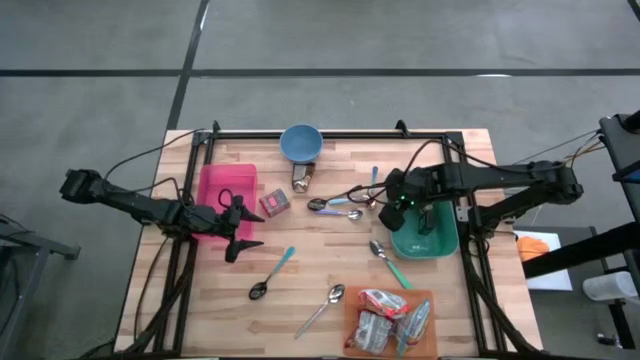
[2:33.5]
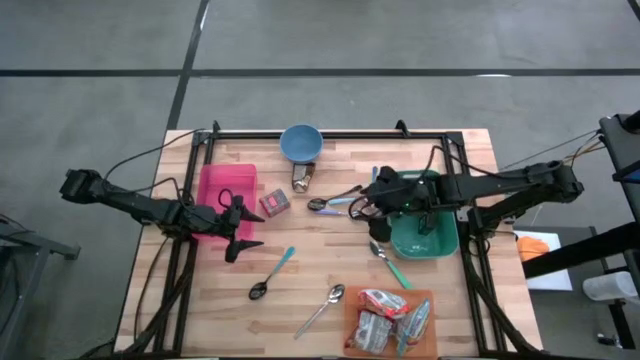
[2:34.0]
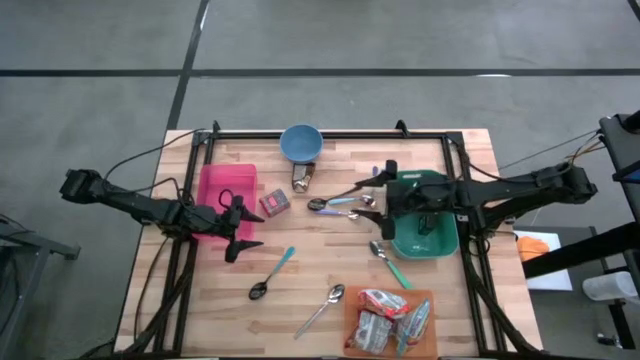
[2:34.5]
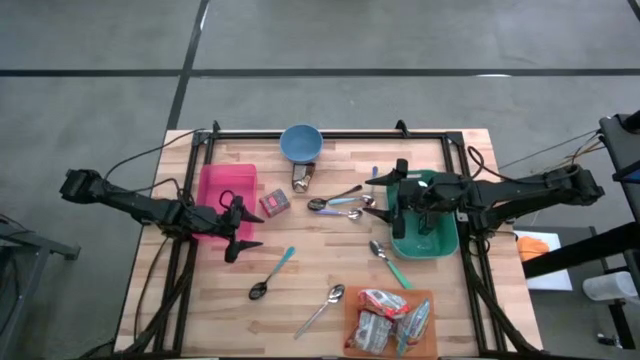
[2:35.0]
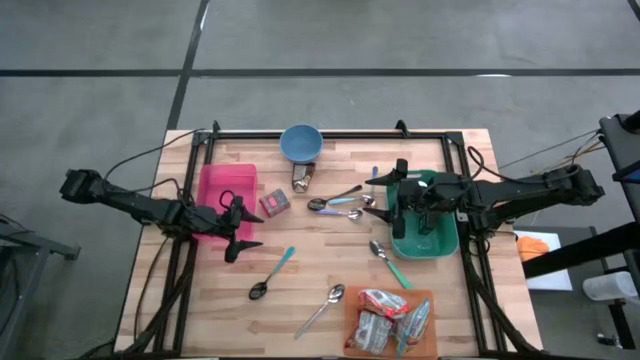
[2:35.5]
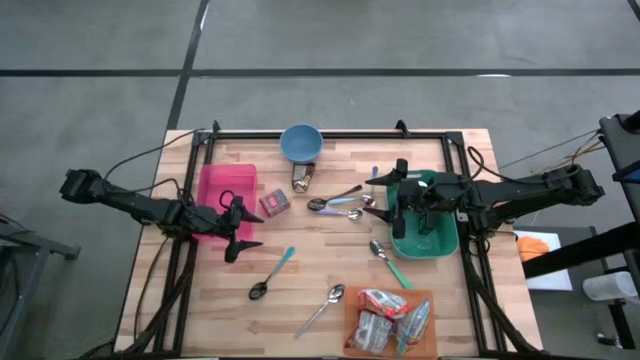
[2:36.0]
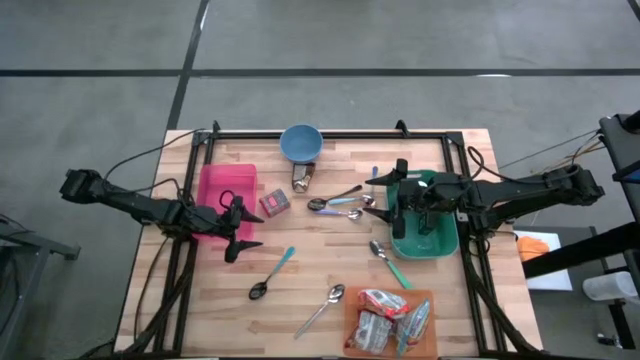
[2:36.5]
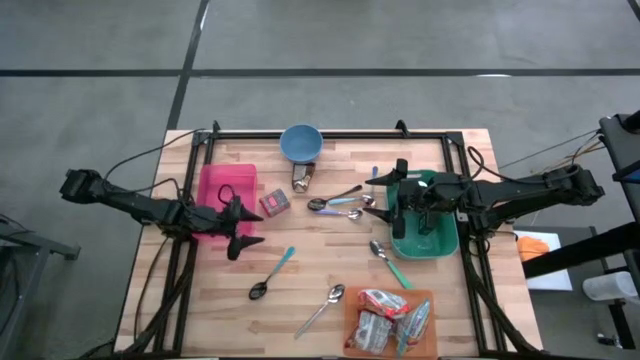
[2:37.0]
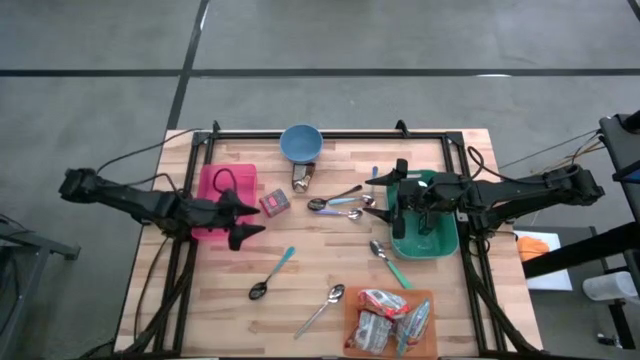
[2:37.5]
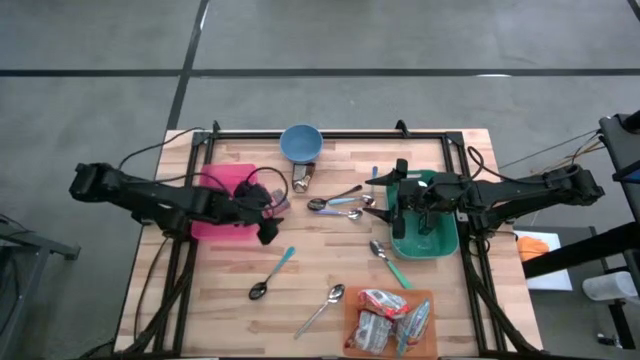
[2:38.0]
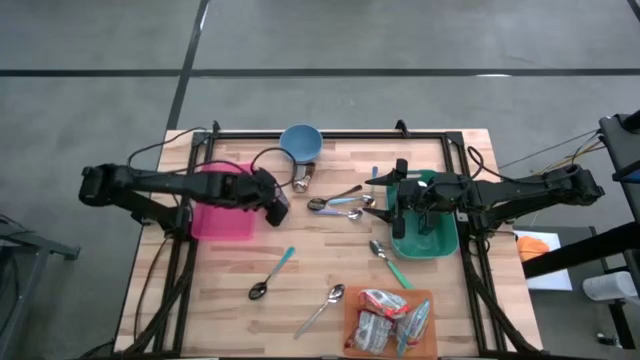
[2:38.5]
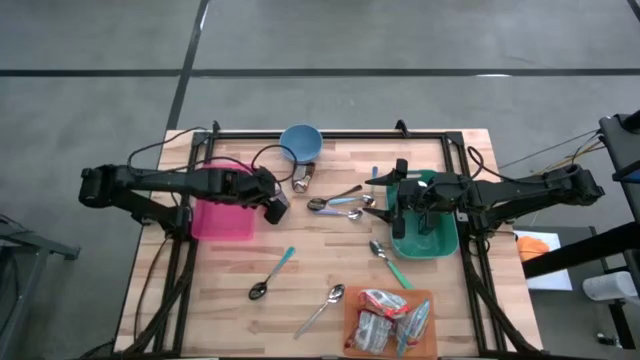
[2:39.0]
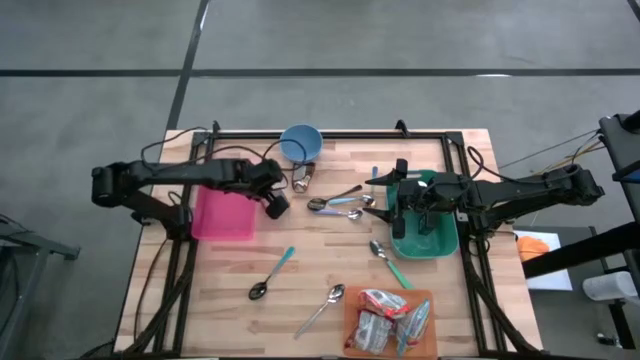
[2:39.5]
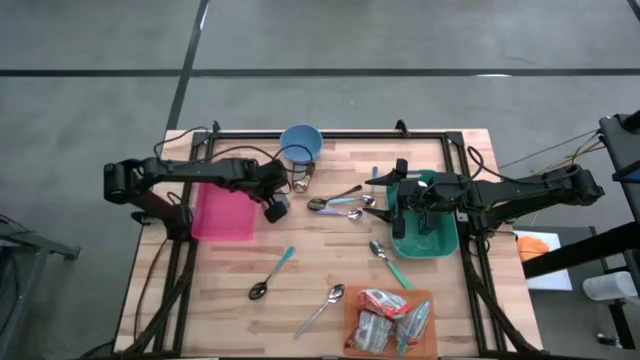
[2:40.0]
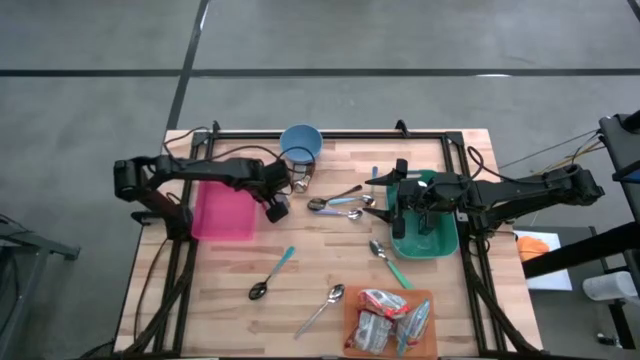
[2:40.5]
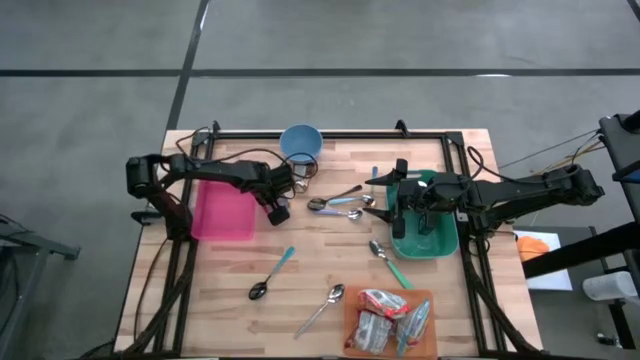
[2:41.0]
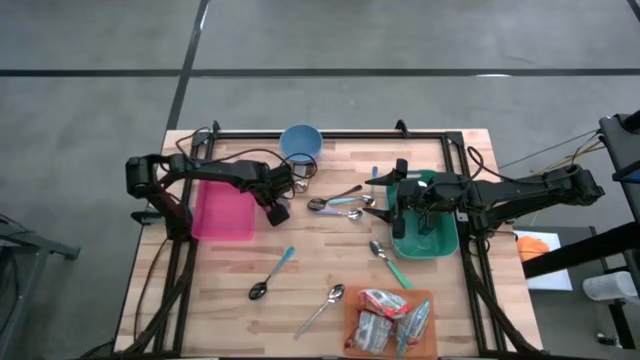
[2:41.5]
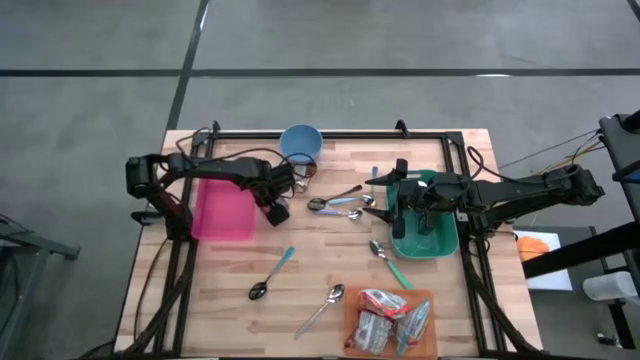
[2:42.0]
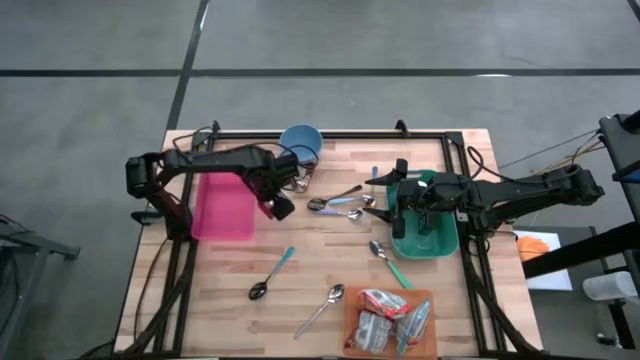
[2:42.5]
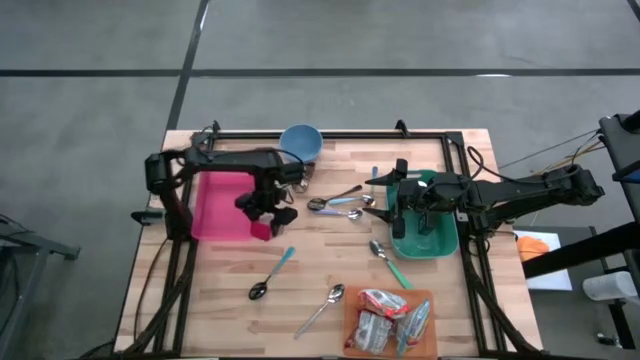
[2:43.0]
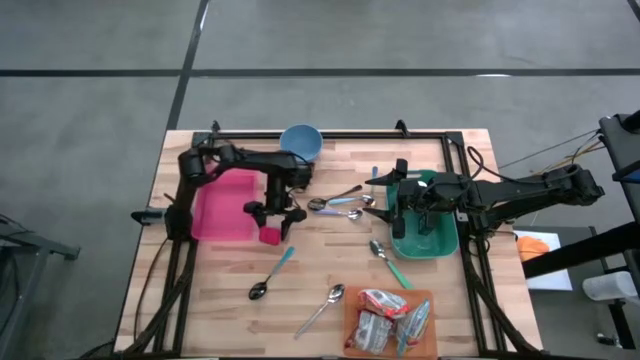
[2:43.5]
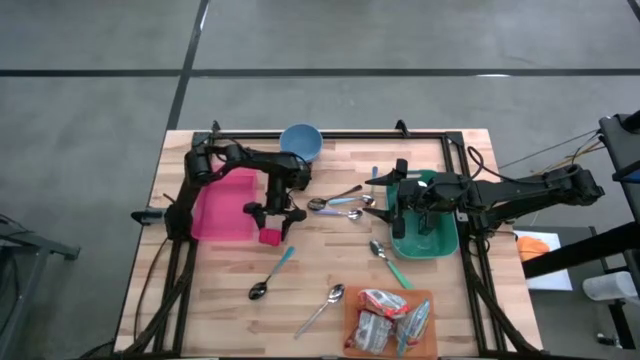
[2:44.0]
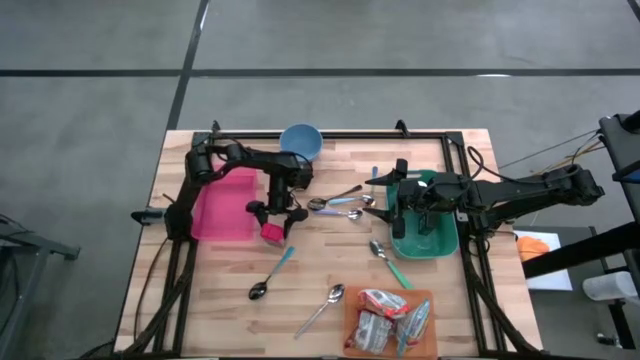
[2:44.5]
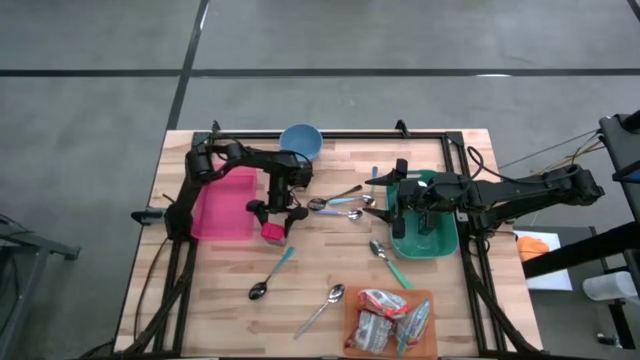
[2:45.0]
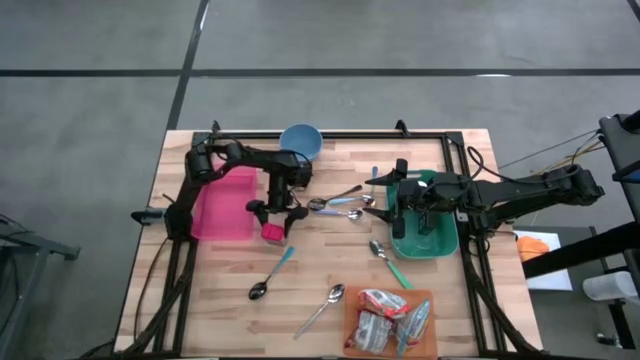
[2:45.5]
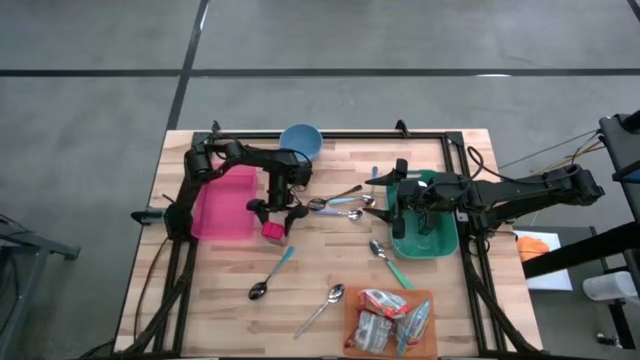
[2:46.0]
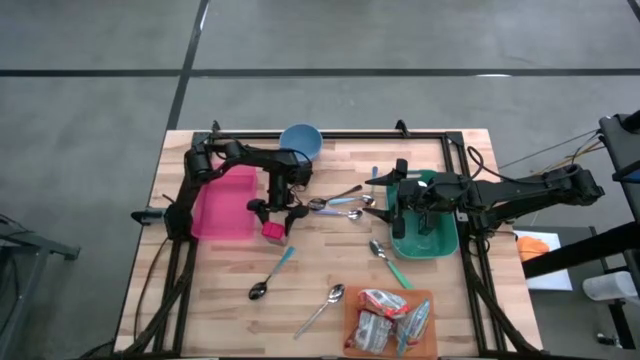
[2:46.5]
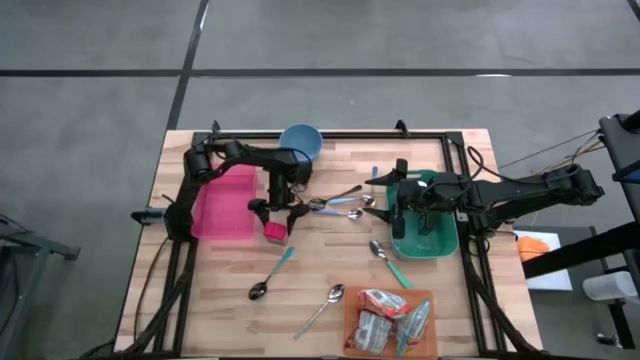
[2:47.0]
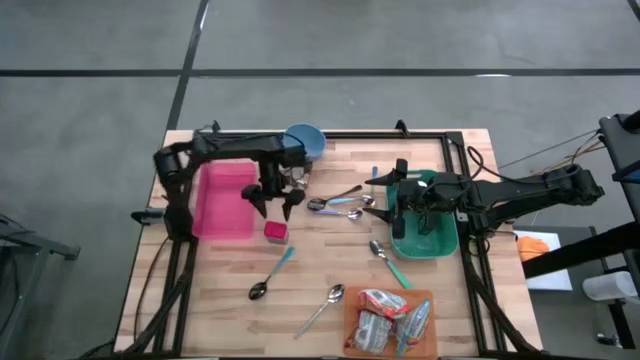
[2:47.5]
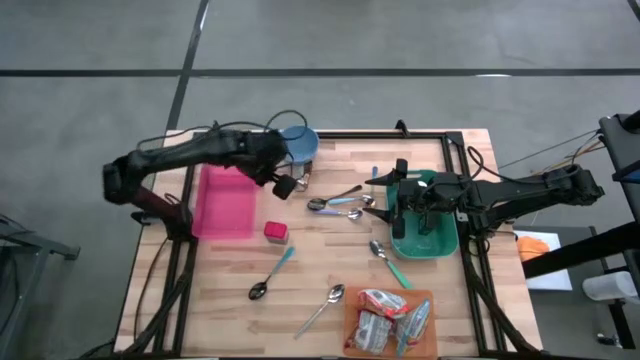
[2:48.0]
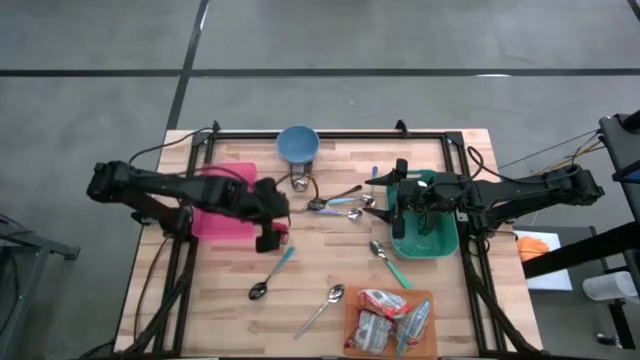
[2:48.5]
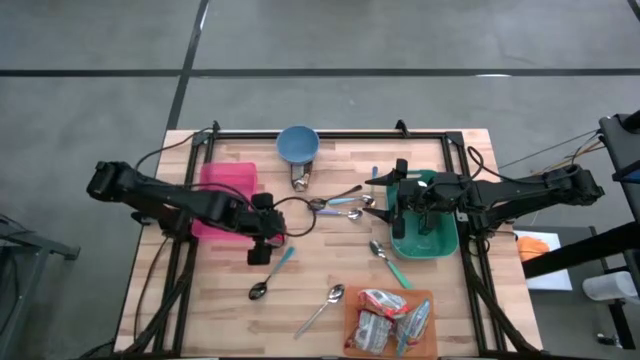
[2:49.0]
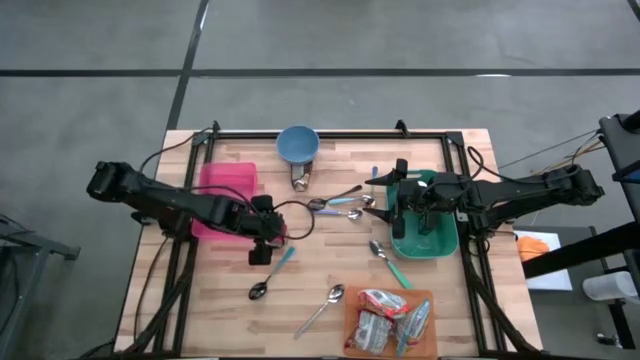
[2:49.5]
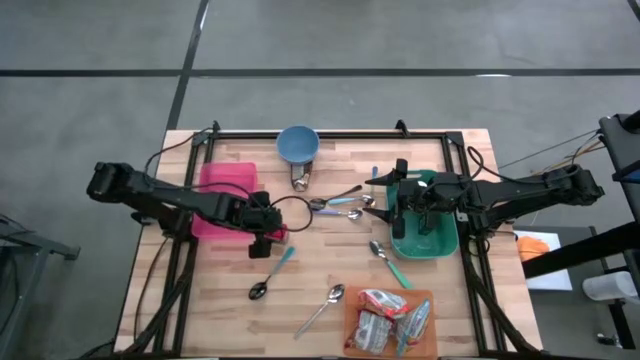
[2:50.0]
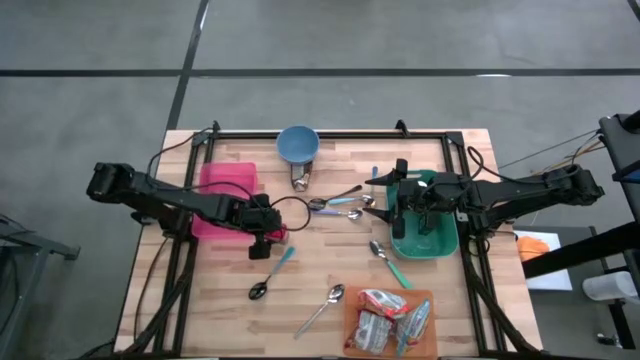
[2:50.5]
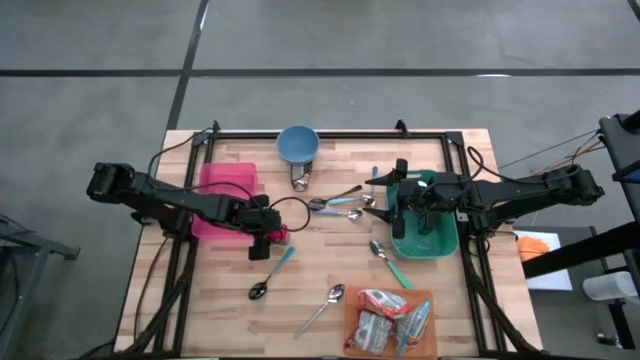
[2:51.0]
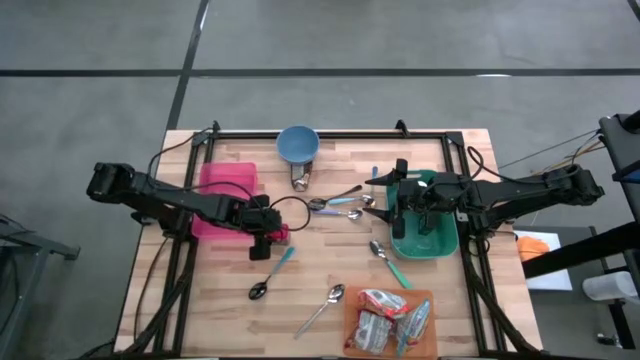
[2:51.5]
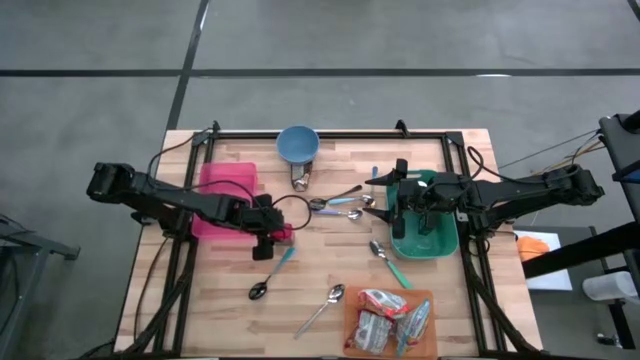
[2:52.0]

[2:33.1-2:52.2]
Put the red seasoning can into the green bin
